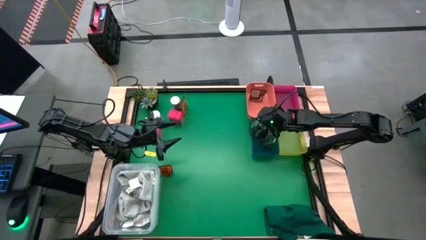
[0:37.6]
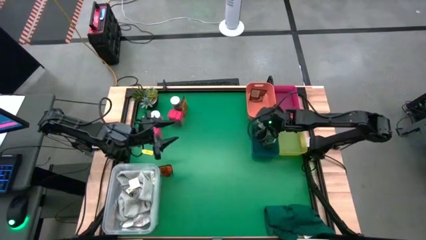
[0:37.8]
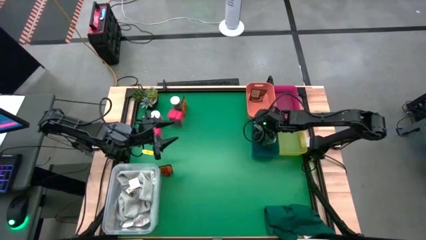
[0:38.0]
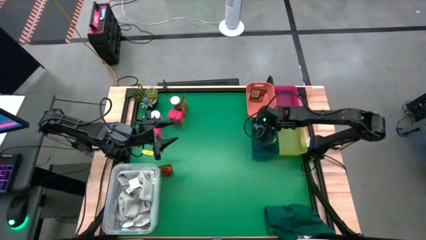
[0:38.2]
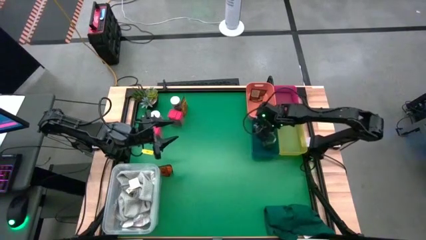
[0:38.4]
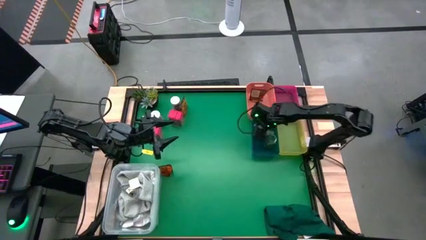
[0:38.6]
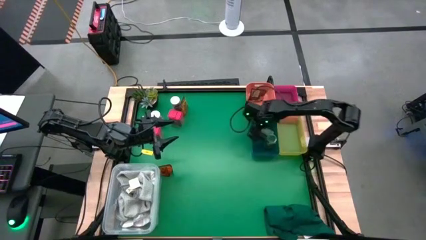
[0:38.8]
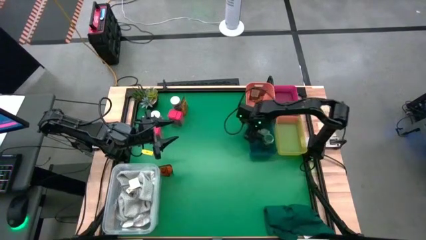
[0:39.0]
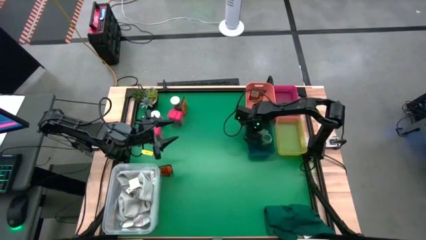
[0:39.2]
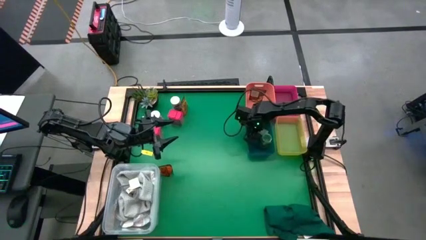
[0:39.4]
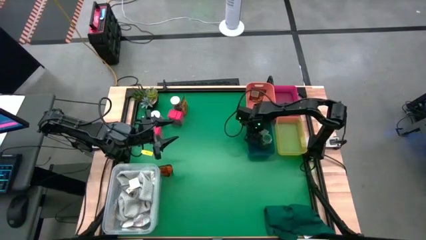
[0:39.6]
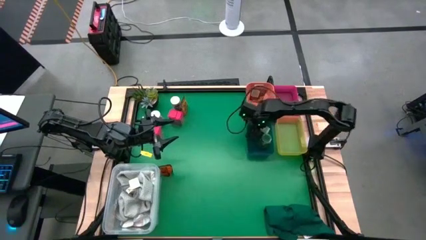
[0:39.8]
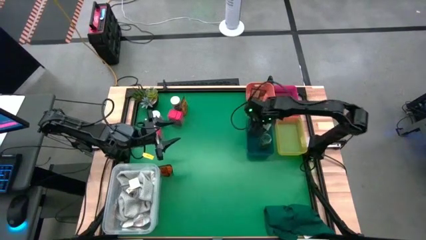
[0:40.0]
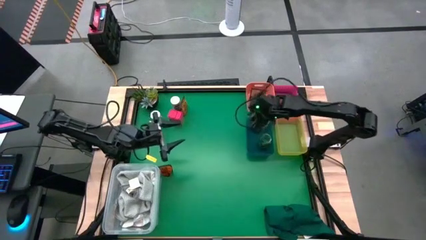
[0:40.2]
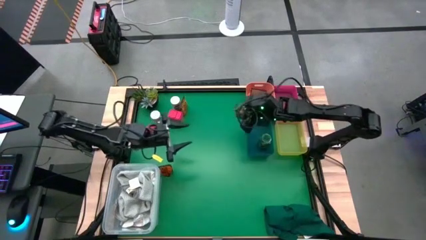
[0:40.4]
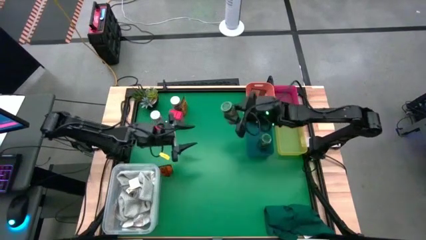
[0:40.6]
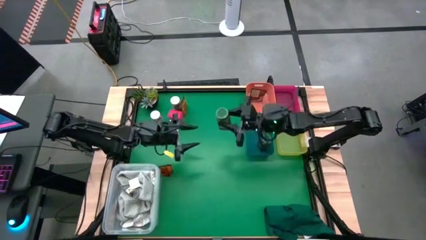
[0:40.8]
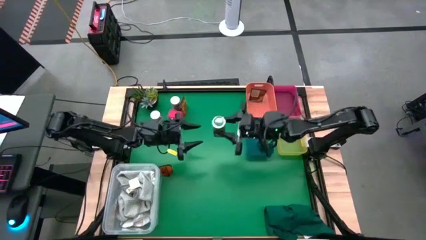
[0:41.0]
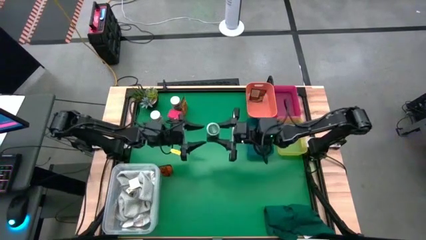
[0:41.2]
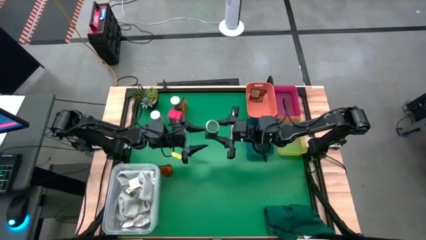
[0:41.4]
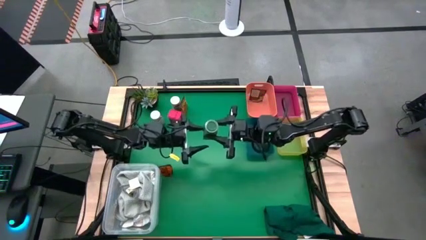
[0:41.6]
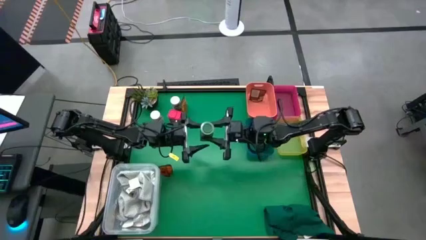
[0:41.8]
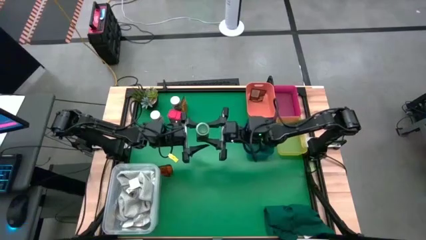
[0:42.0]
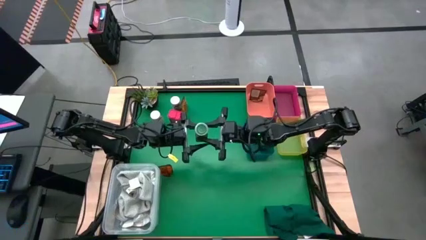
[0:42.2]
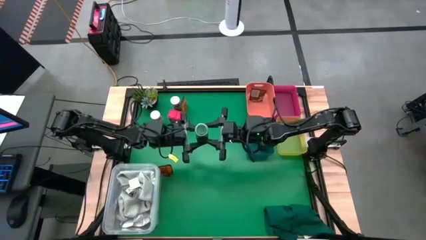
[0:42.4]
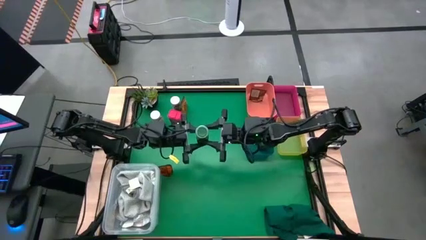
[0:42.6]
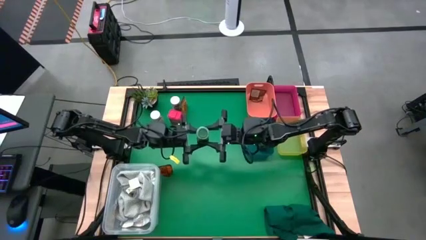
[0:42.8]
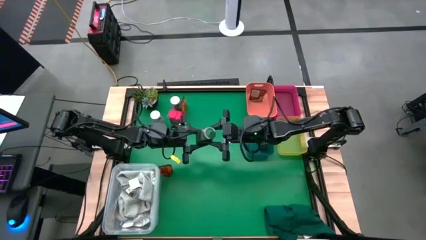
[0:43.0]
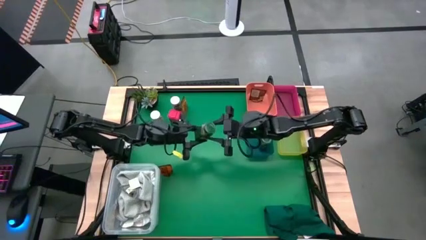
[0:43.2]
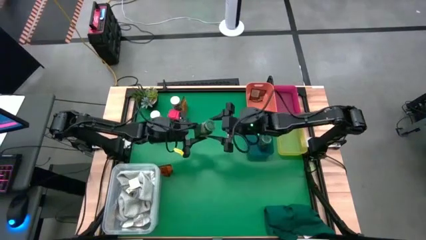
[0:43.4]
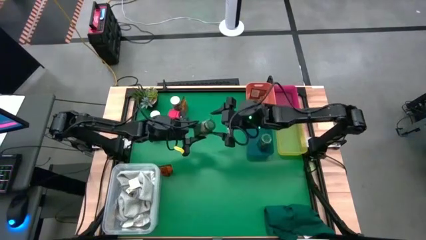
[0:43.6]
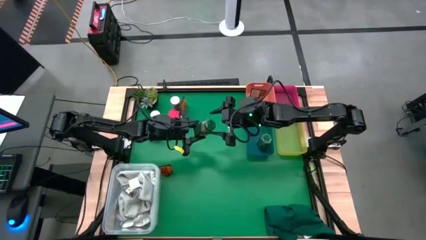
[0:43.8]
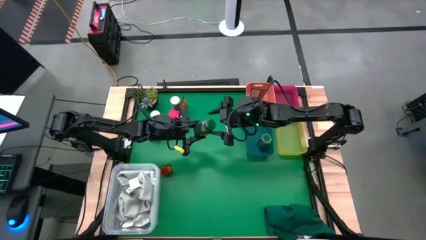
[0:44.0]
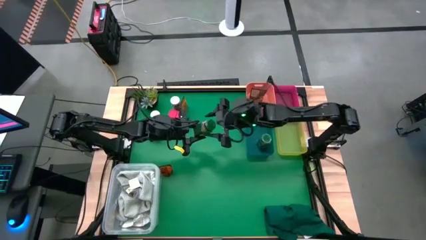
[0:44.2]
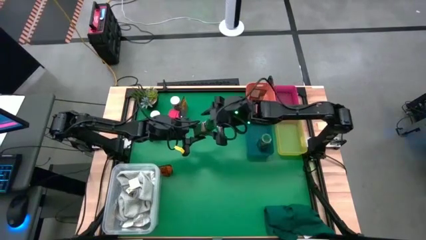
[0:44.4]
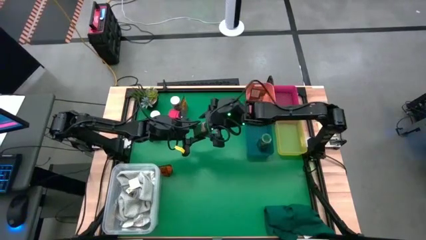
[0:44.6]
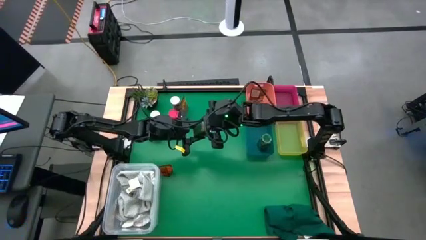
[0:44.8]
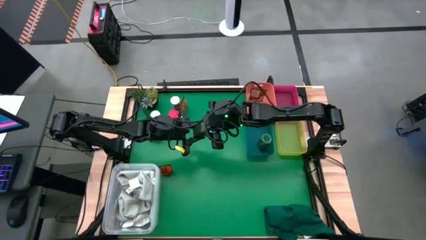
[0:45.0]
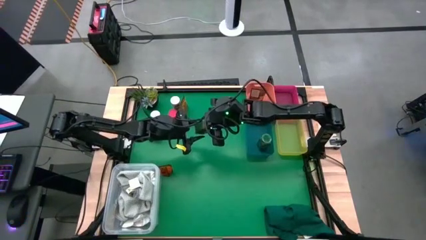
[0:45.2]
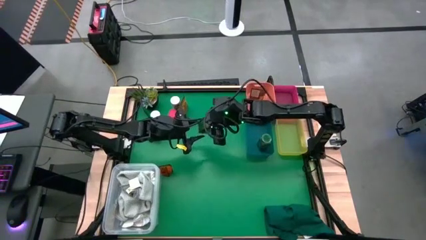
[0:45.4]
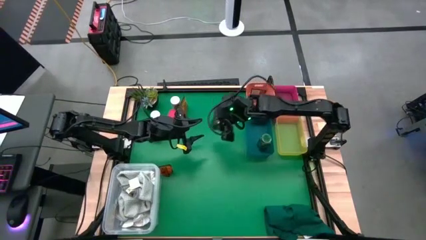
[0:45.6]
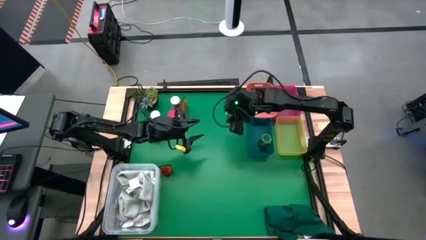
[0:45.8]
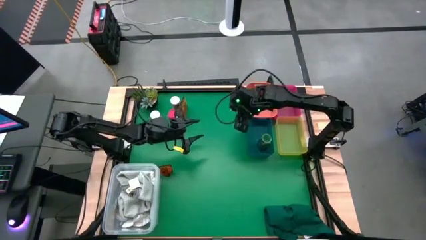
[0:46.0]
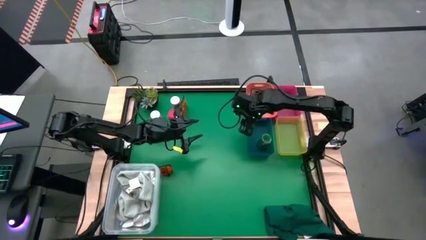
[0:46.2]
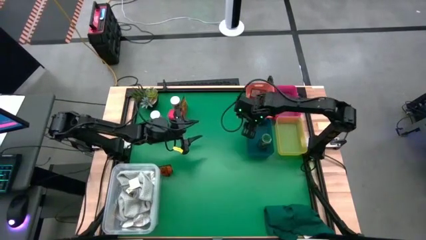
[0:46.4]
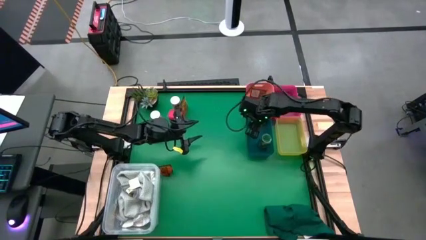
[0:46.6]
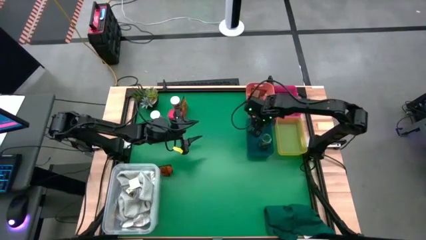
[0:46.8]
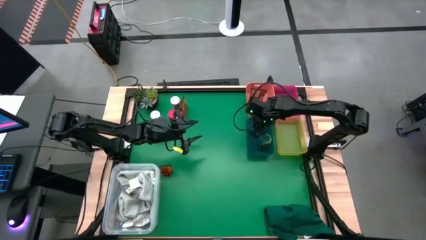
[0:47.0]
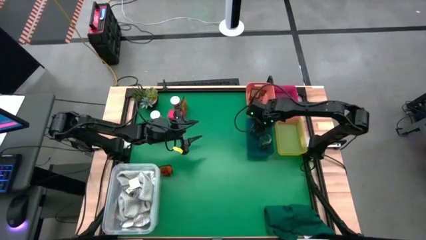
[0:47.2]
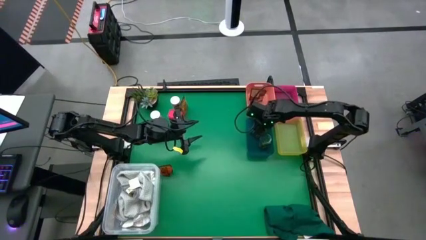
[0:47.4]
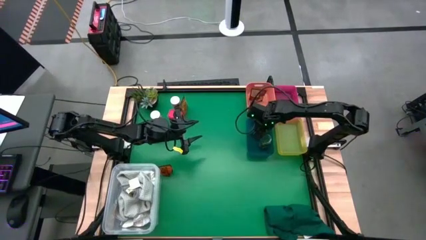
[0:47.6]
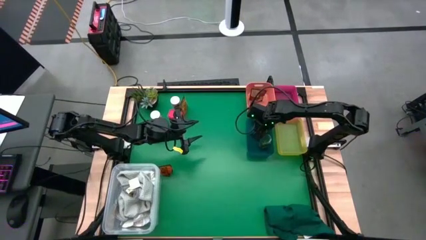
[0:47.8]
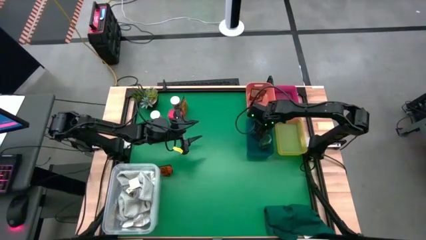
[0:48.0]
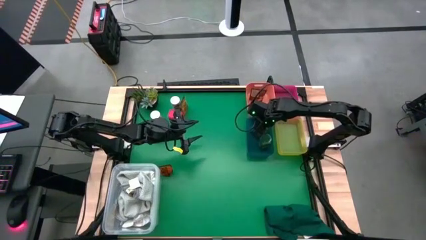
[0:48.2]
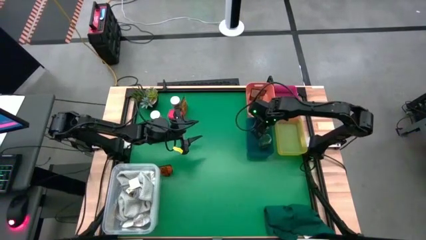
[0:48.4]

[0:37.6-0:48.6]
Task: Sort spices by type
Put the green seasoning bottle into the blue bin

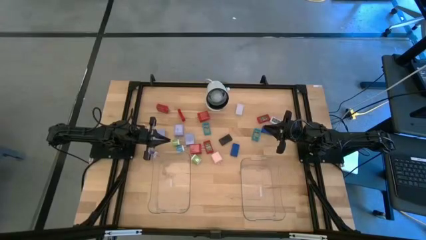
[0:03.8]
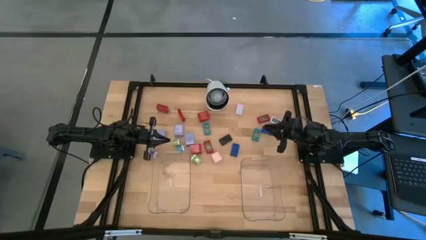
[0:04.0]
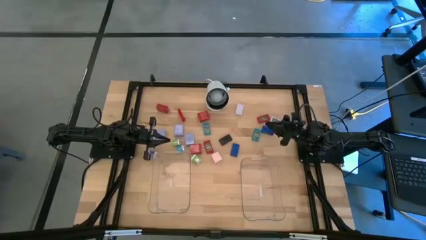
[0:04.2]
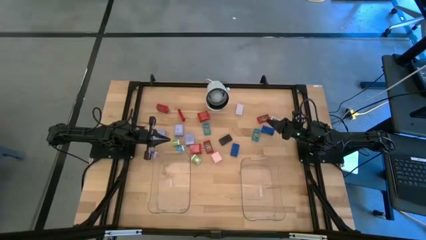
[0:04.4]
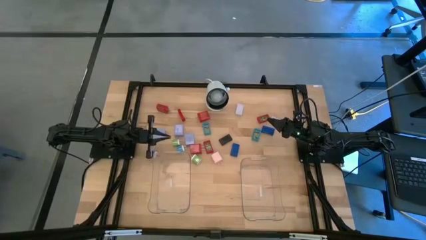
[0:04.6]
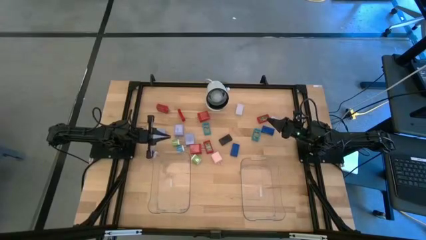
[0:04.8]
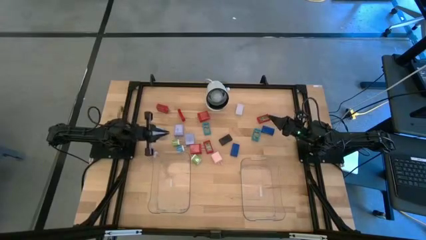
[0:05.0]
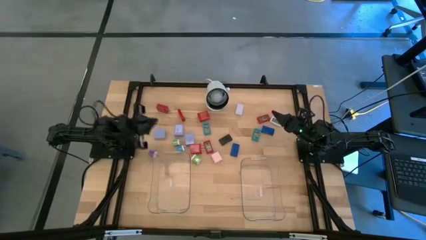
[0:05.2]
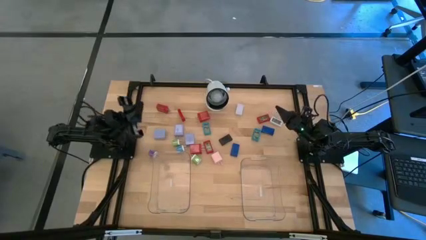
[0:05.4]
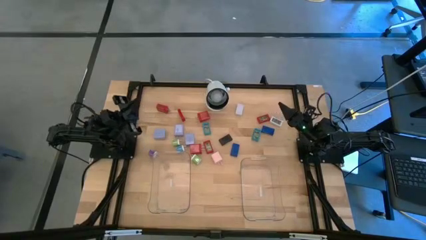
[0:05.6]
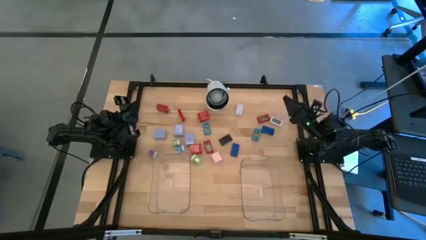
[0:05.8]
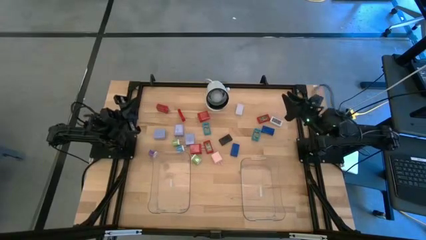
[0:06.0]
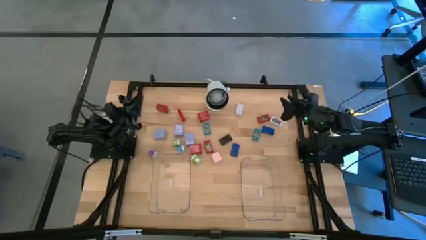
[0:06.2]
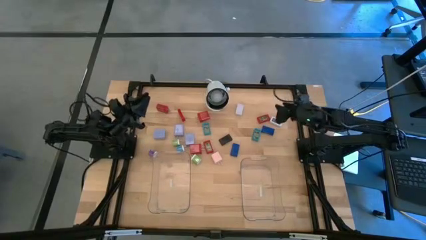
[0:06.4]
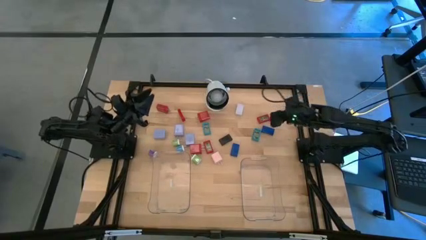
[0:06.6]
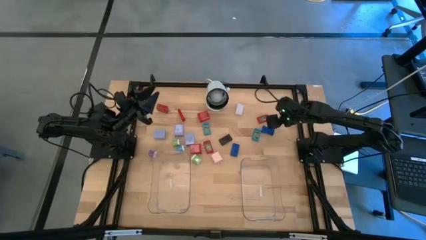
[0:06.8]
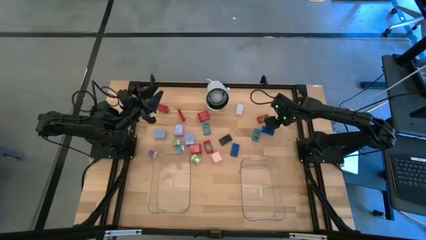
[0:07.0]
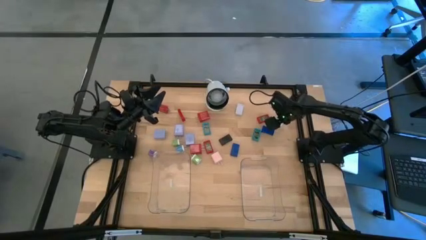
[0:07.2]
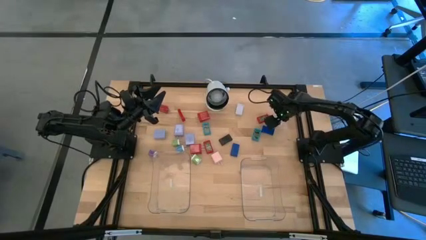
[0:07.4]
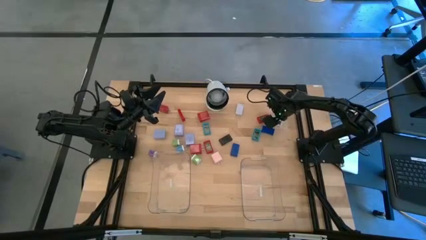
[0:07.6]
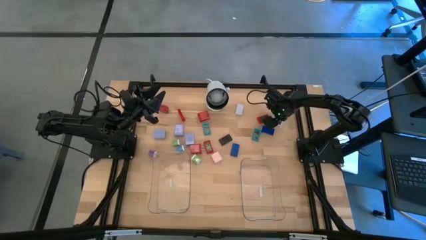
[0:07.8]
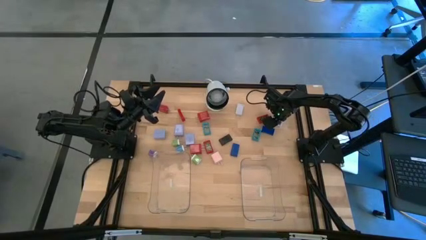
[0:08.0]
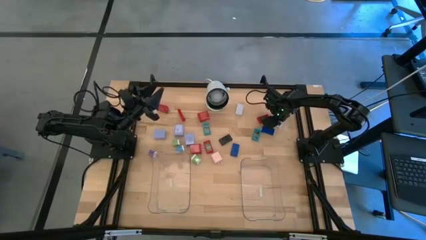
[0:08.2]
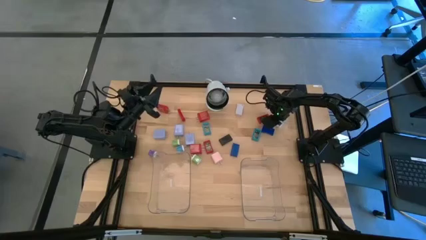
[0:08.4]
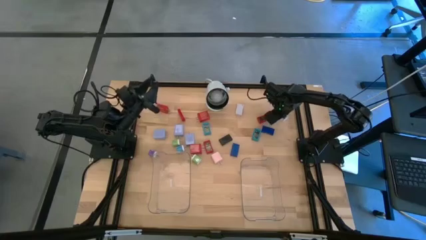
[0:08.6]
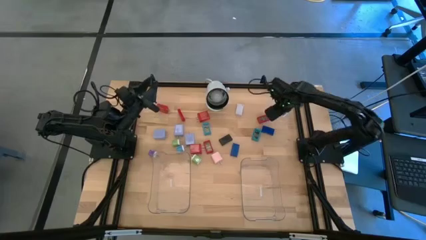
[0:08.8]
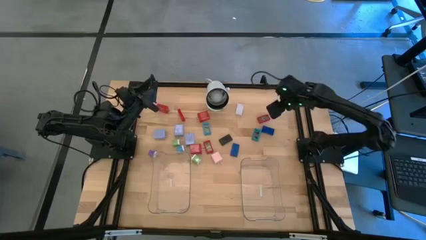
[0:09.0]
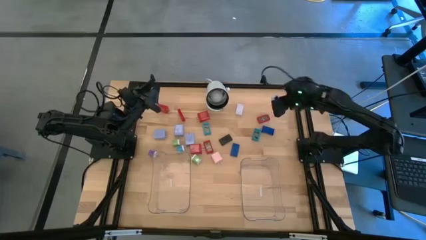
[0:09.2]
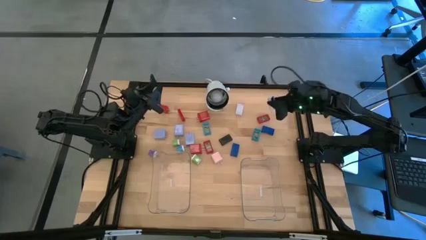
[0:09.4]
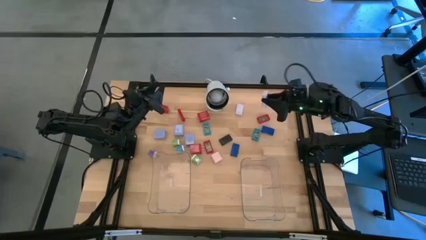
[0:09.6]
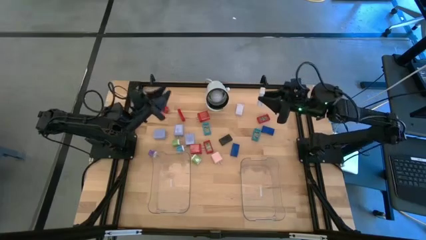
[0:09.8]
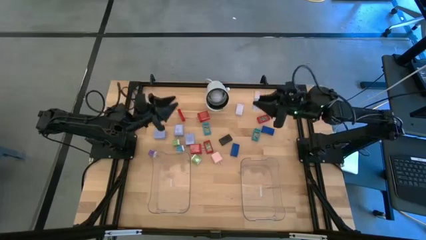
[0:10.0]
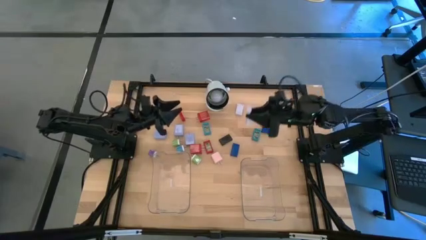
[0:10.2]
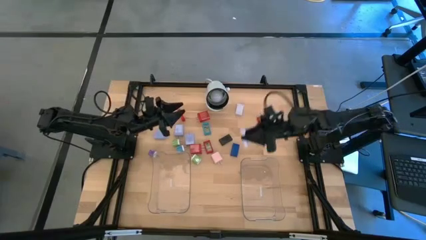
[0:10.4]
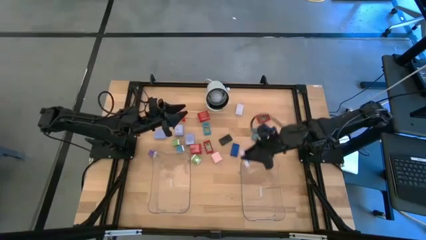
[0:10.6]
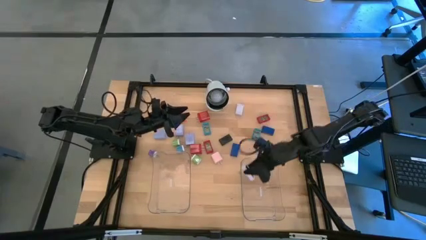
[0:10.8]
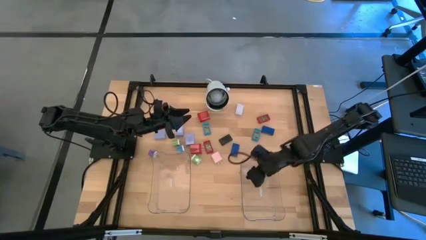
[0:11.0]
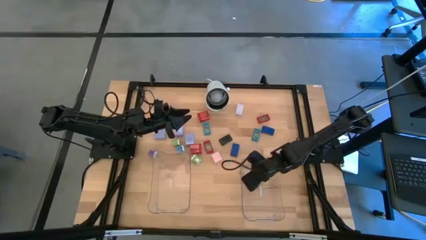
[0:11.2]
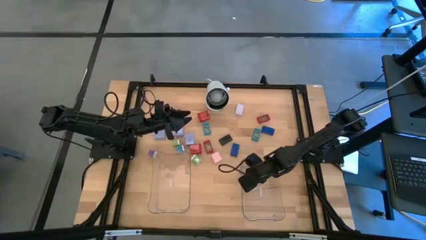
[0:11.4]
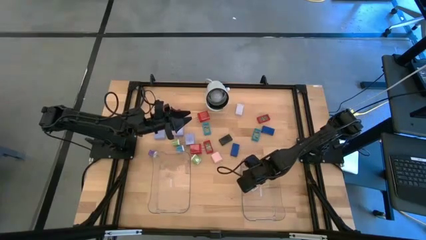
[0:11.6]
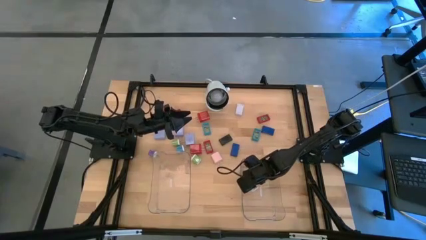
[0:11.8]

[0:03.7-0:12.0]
Task: Pick & Place Office items
Put the right white timer into the right transparent bin
